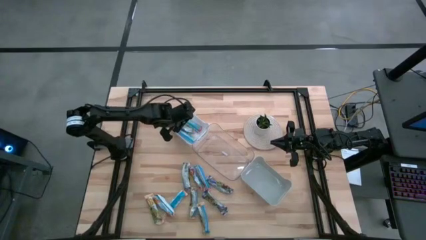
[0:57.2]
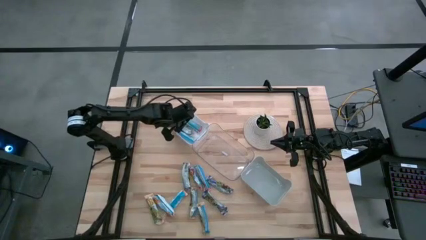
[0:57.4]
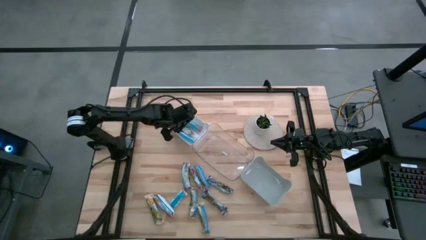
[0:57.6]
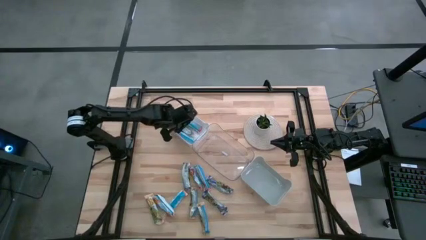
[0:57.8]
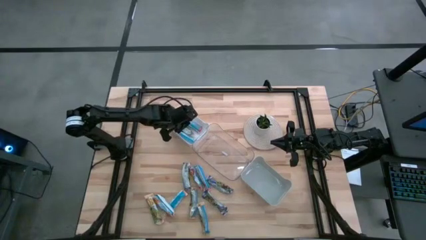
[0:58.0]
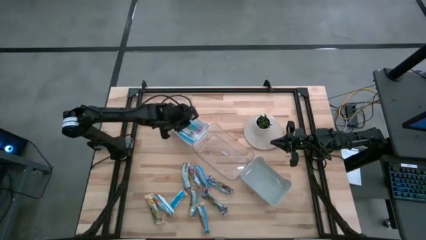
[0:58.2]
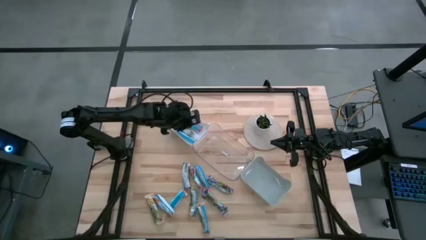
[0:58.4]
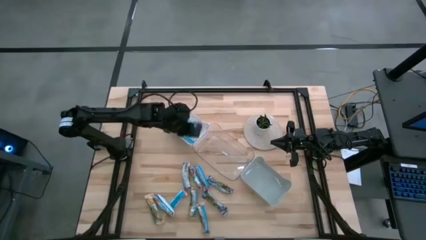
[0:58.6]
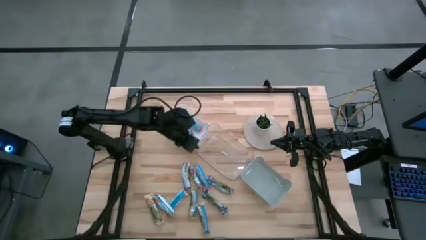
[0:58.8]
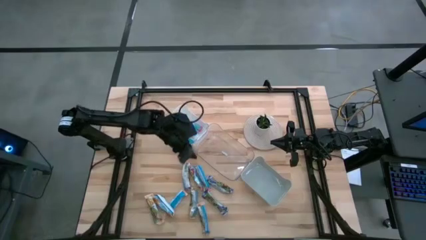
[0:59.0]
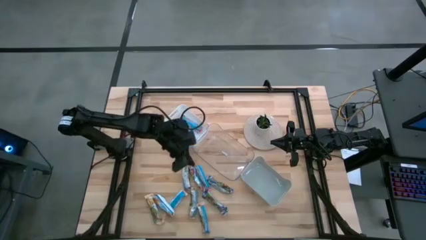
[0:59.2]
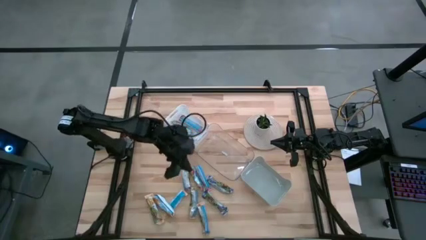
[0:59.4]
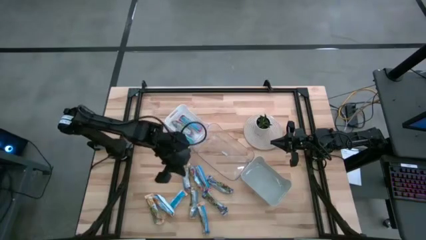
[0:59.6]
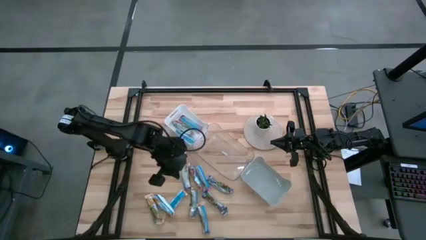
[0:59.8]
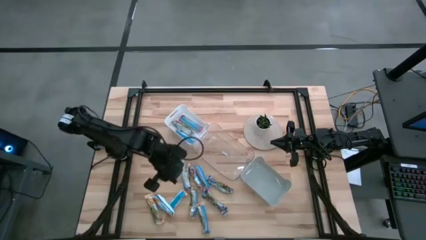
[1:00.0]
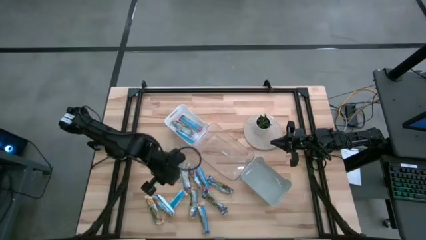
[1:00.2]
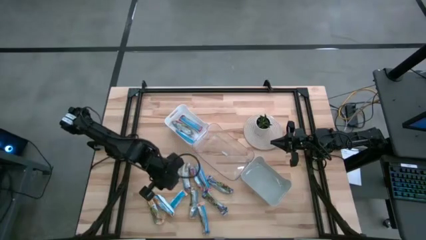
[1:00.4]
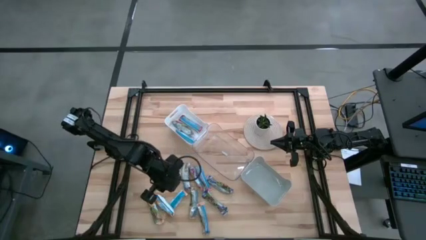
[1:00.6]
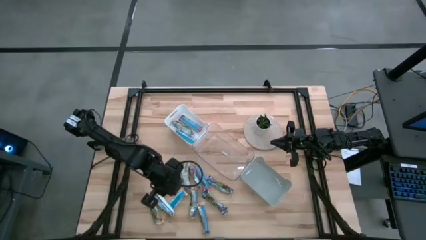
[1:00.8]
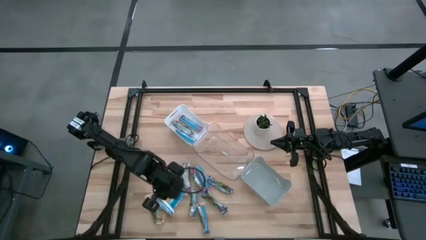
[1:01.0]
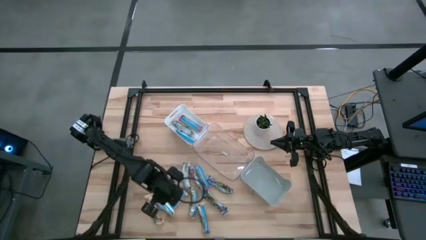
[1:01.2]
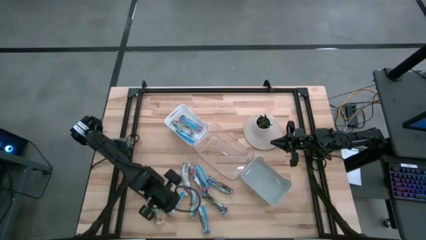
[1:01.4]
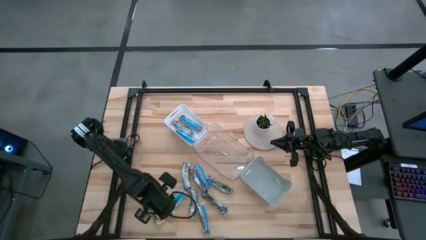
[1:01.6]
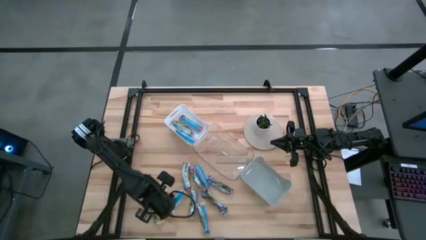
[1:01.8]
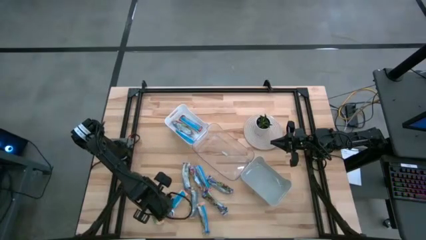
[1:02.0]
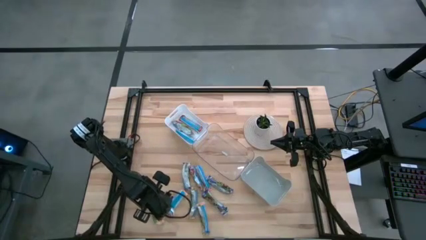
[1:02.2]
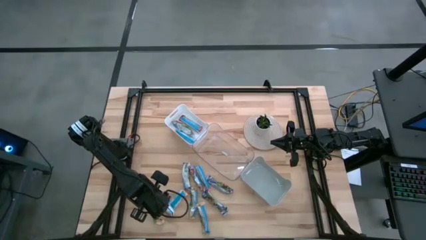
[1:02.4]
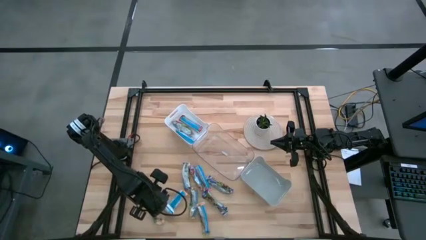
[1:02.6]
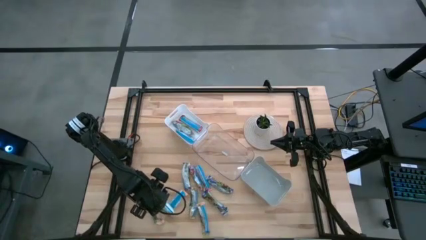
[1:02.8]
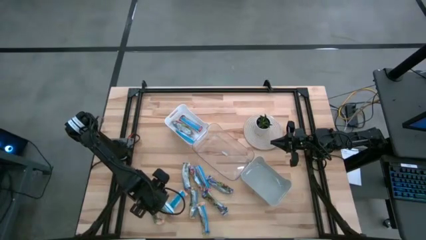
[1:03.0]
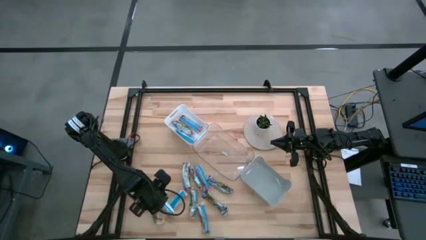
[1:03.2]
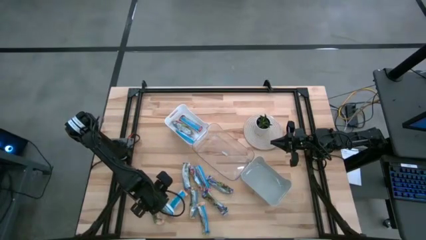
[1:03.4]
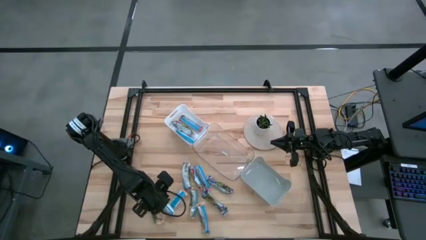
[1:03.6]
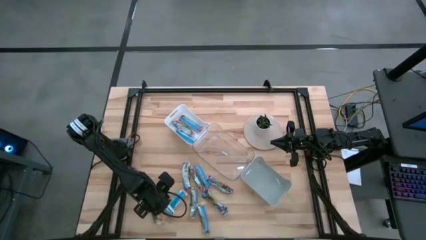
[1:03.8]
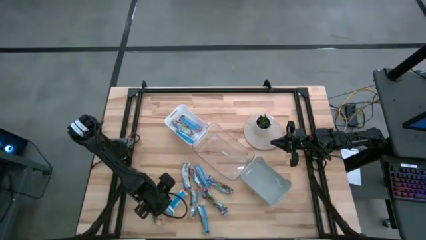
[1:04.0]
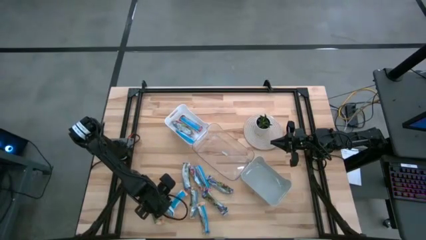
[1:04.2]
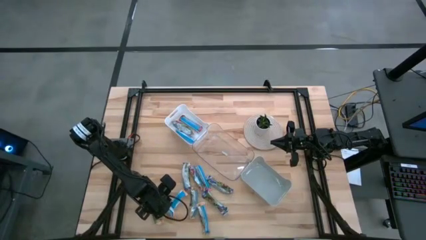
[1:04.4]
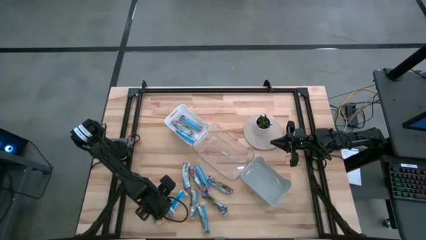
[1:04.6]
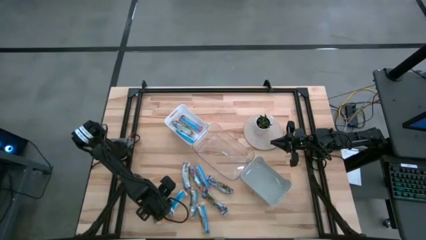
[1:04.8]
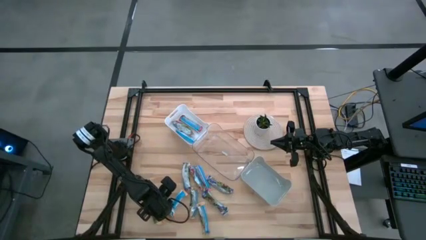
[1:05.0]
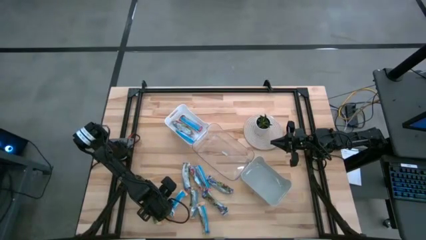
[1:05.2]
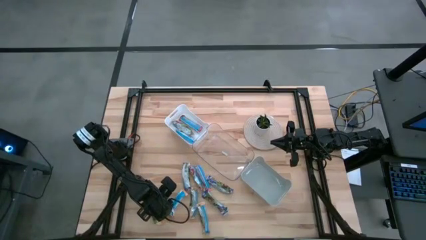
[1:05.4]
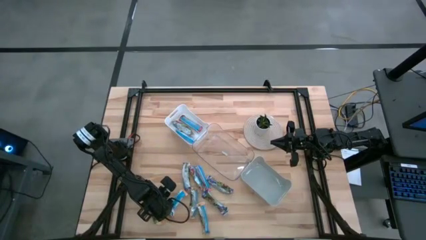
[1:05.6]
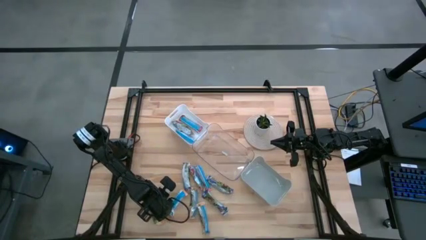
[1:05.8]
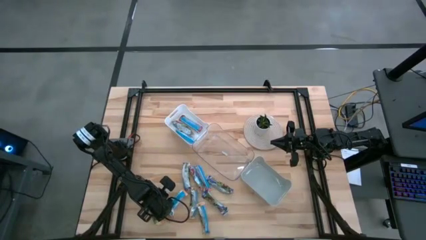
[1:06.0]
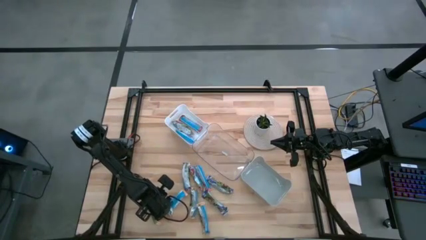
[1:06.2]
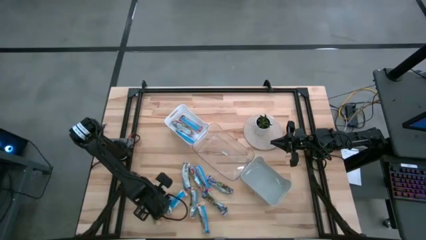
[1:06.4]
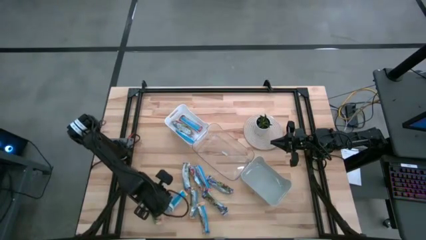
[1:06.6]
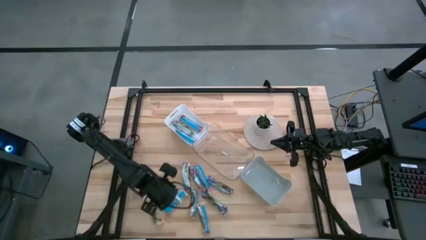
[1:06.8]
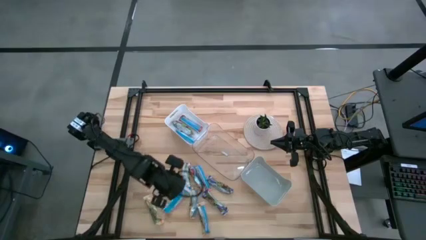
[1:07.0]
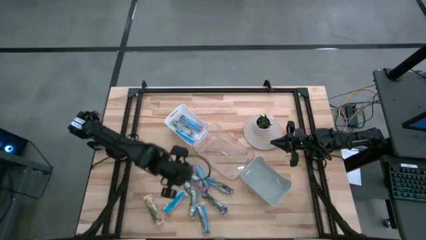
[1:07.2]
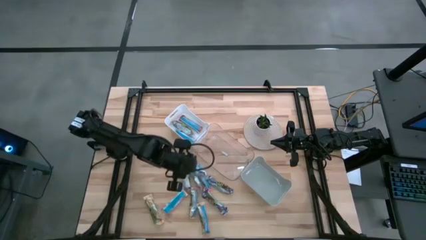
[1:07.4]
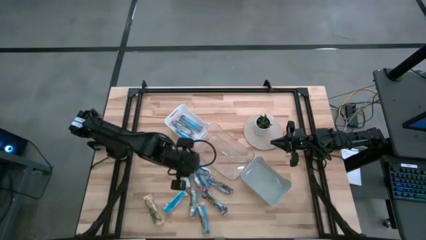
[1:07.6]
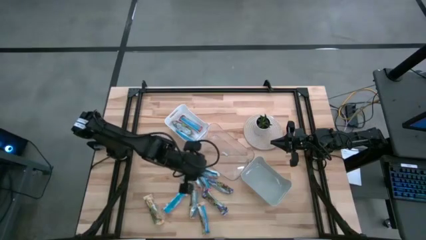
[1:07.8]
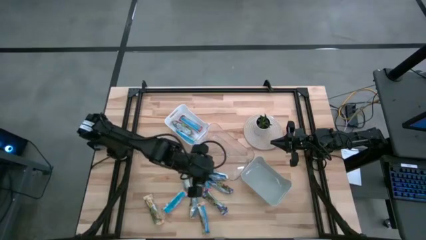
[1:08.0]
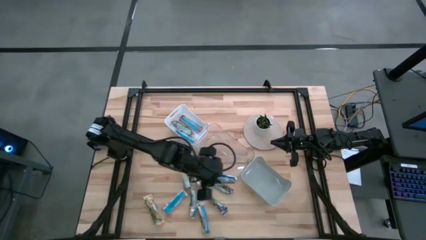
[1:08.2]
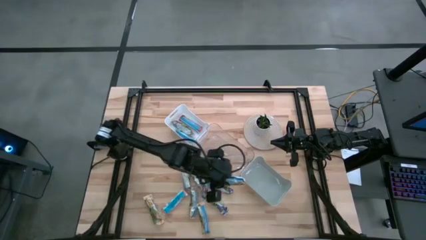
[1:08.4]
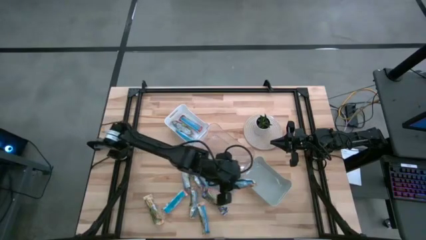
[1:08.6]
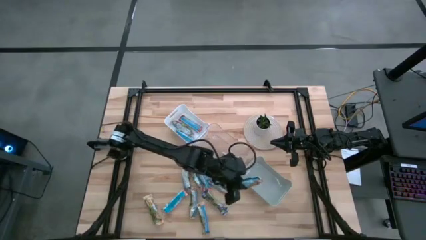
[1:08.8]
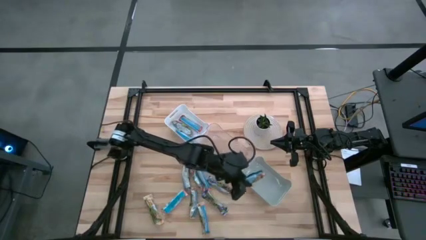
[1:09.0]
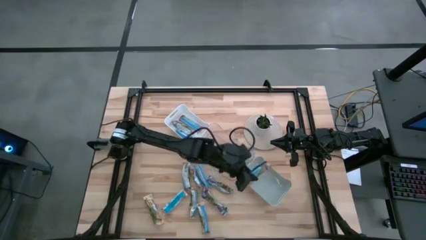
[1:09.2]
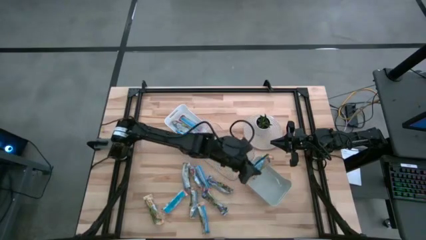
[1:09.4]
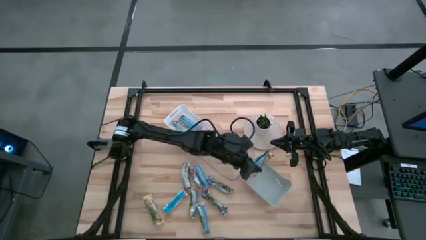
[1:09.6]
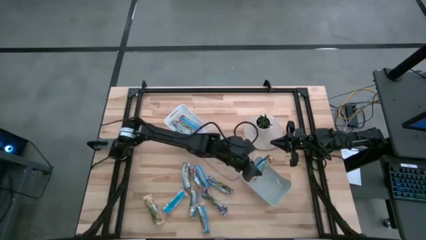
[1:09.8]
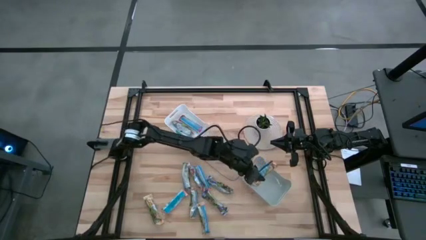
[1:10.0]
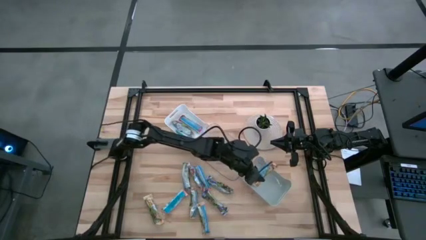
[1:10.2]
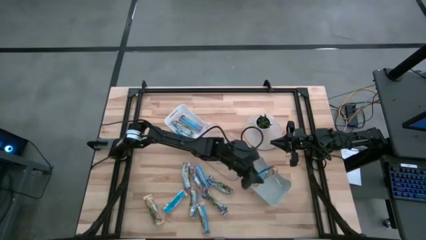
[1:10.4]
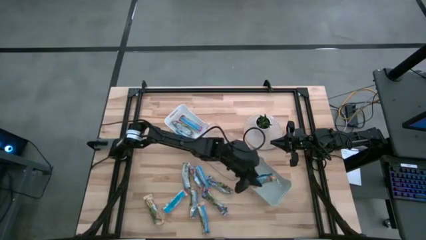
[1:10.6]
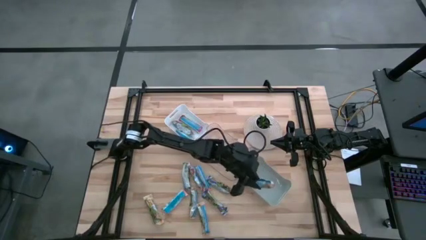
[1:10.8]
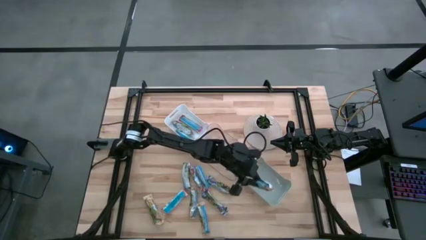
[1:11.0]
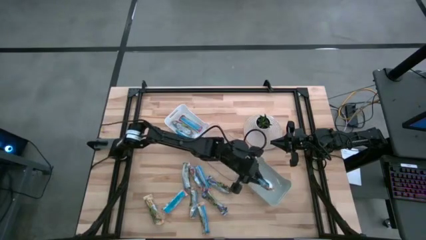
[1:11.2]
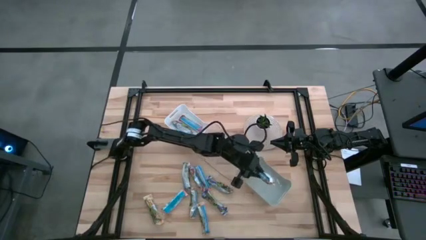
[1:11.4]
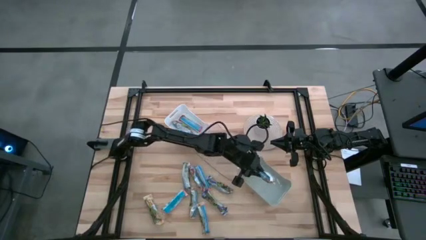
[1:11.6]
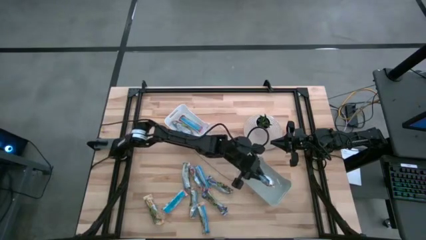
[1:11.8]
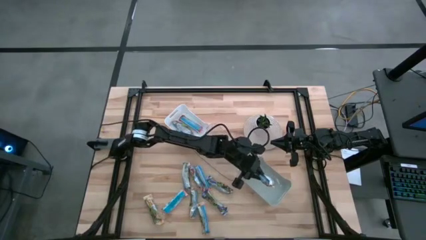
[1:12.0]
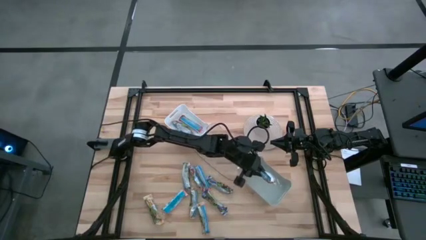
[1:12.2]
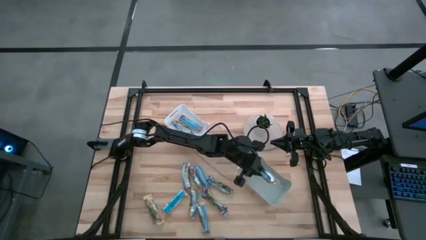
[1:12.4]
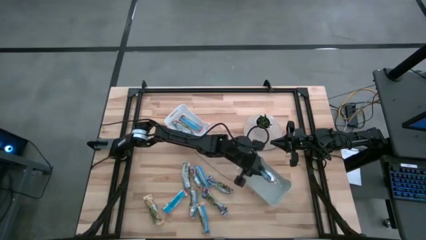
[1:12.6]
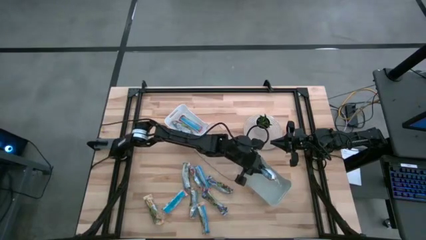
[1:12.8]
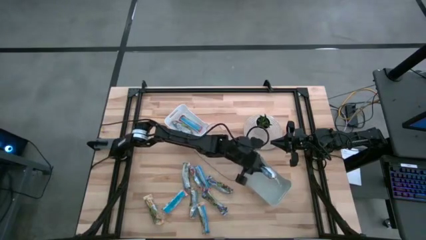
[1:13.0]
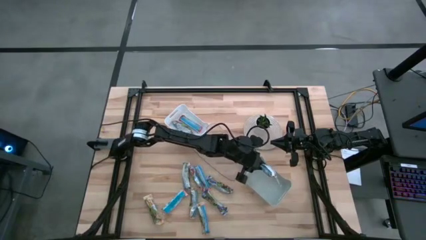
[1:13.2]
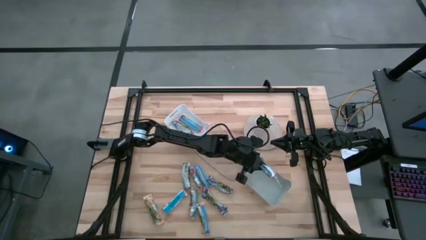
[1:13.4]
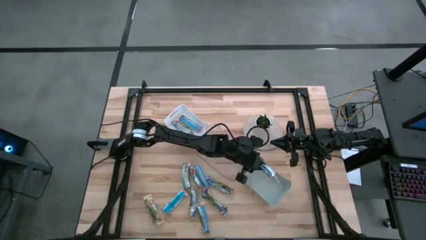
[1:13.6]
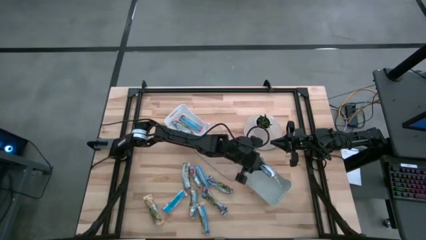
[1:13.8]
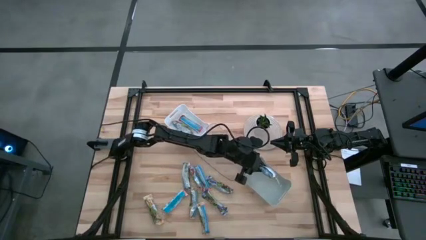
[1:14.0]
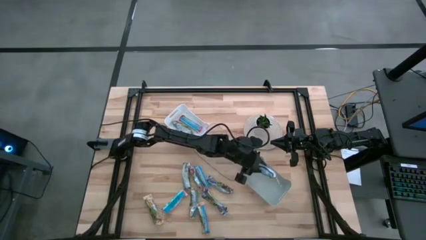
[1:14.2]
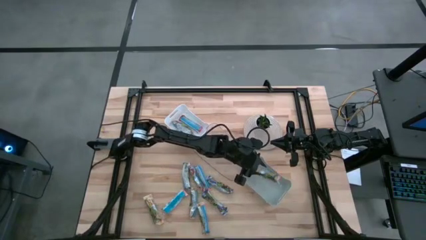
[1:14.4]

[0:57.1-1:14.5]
Task: Pick and place Granola Bars by type
Put the orange granola bar into the gray bin
